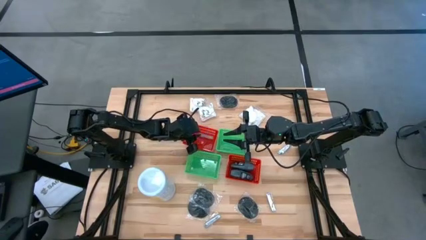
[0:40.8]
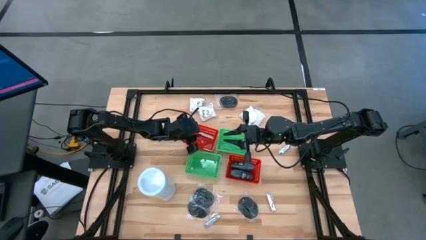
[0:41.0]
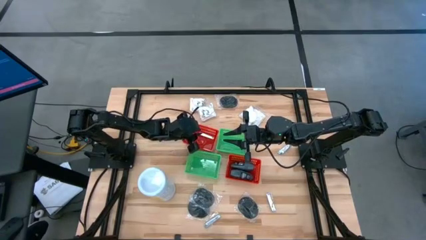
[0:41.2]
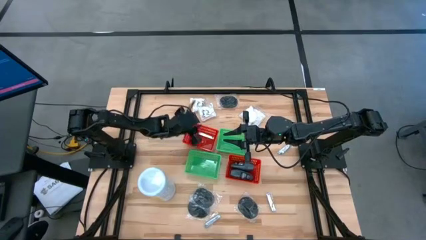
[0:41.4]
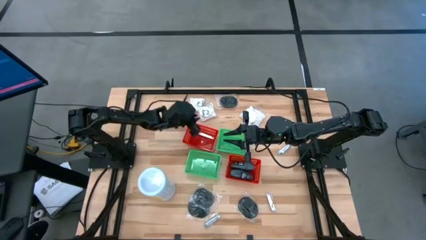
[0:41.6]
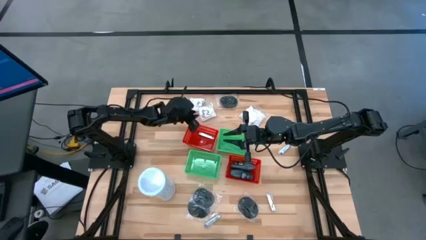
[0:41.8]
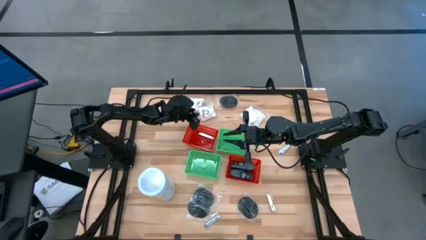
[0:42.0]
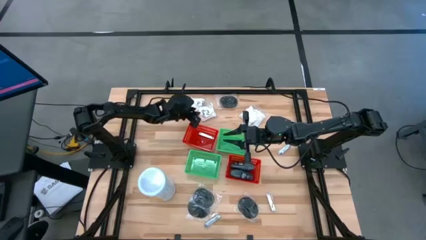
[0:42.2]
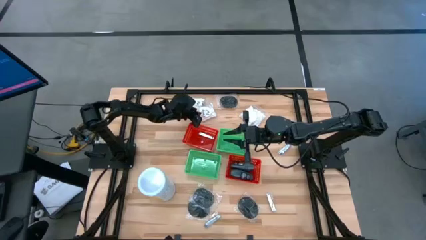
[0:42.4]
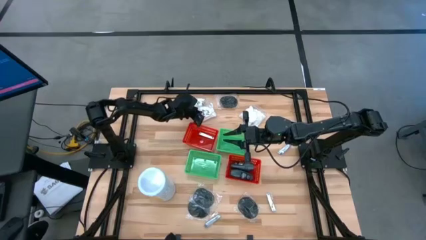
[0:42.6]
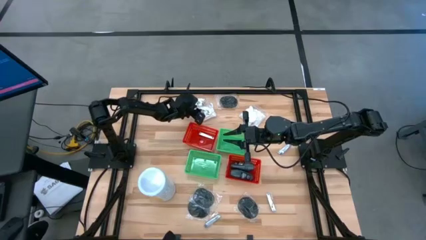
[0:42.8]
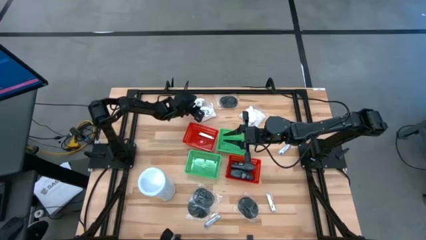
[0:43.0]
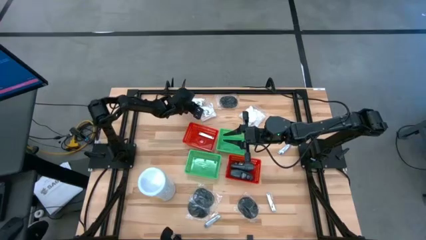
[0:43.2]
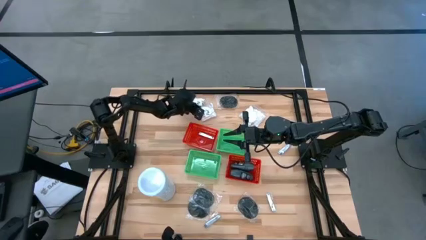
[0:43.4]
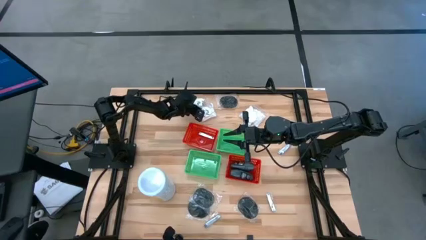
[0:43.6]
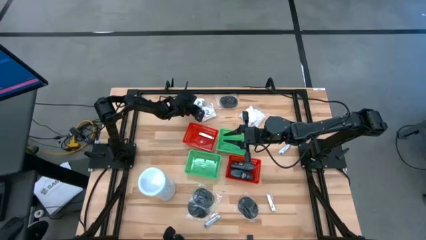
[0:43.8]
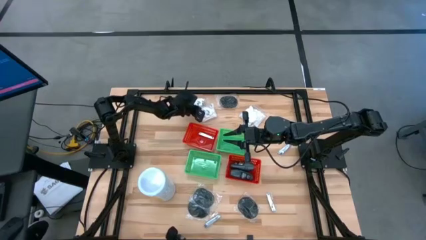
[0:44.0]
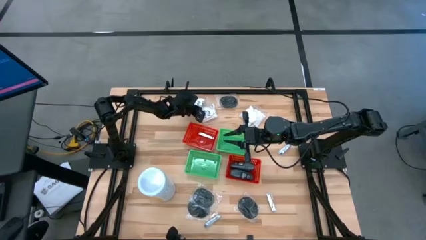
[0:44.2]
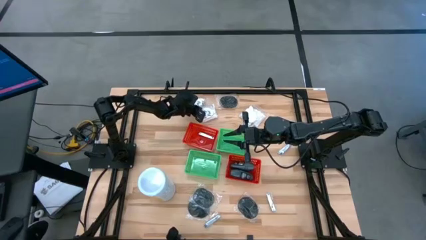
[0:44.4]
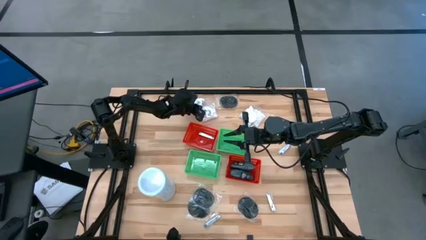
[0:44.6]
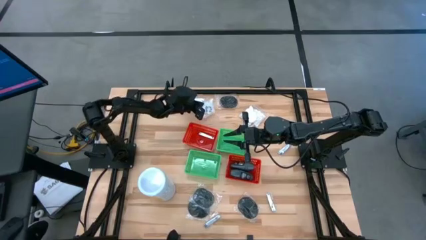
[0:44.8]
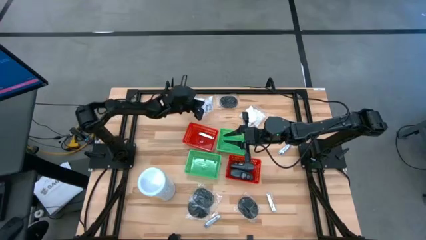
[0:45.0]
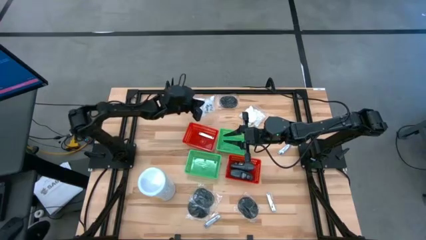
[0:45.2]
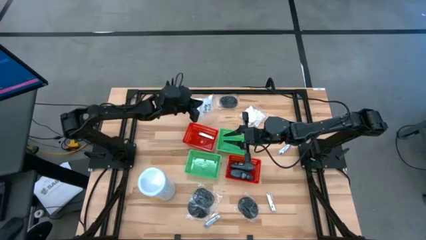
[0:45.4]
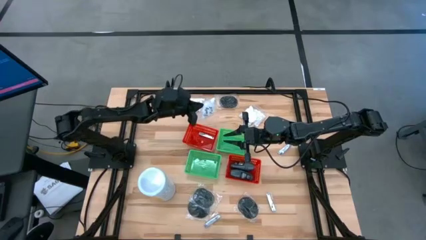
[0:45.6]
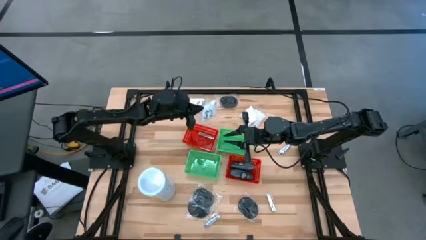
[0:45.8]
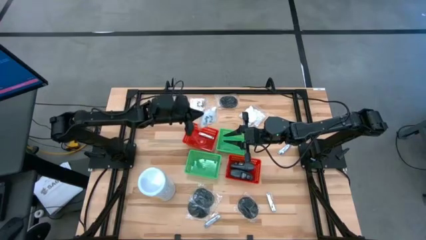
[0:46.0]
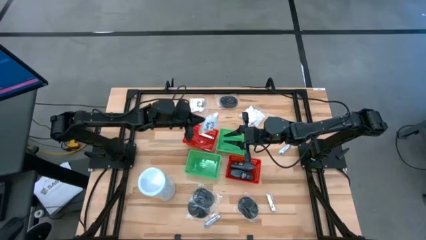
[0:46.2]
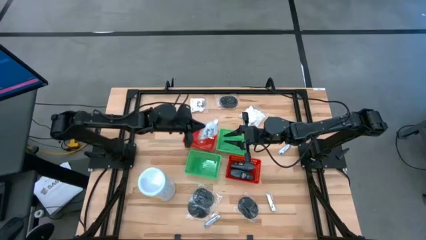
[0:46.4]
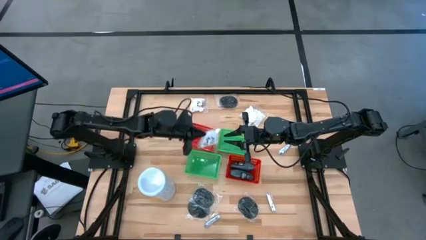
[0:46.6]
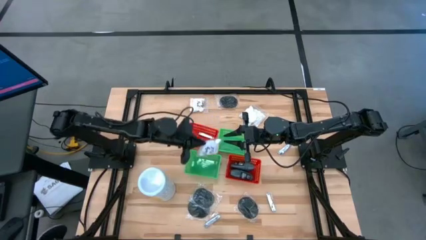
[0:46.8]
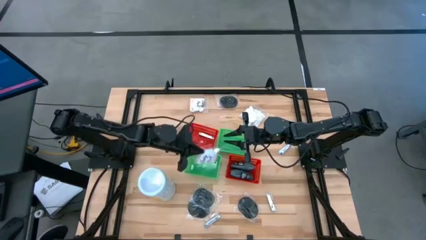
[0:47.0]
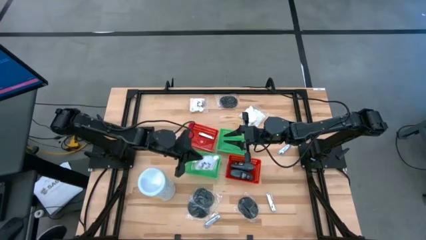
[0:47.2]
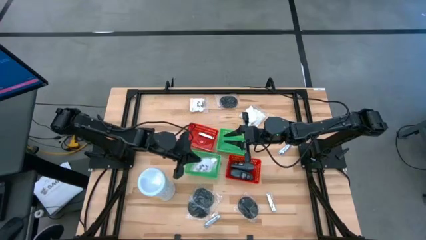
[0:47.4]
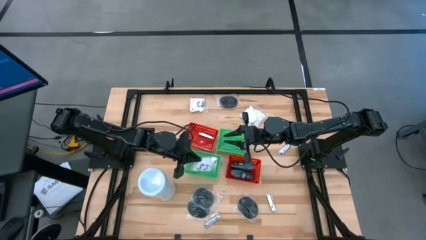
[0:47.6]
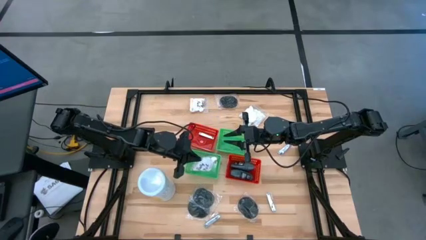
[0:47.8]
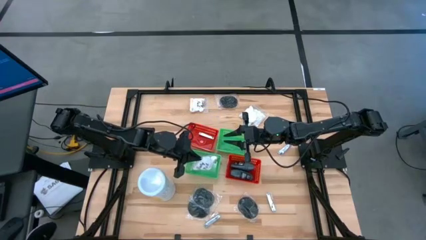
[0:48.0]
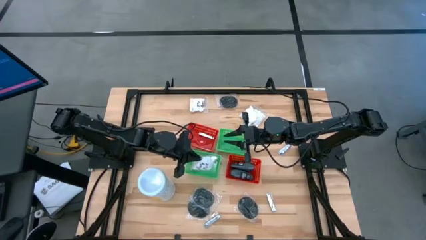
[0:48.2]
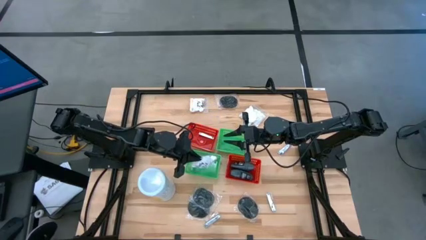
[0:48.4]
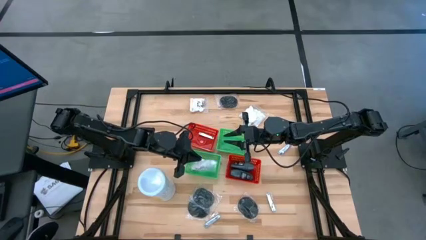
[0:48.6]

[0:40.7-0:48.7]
Task: Pick & Place Travel size toiletries
Put the white cotton pack into the bottom left green bin

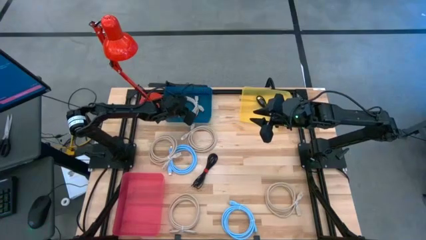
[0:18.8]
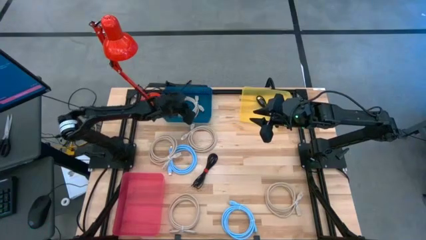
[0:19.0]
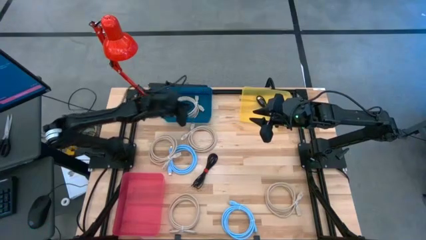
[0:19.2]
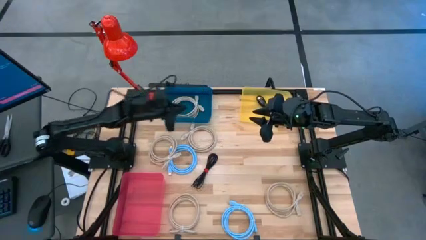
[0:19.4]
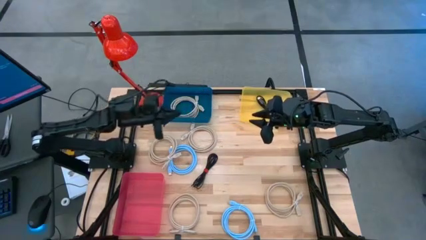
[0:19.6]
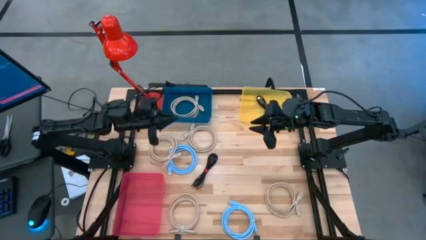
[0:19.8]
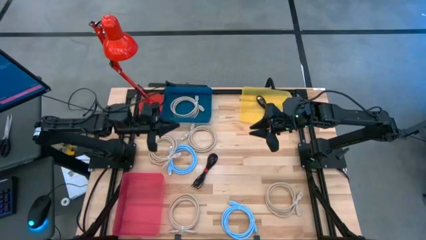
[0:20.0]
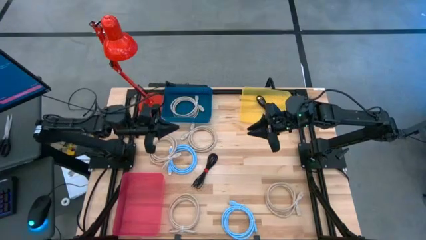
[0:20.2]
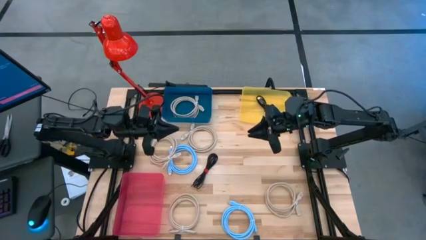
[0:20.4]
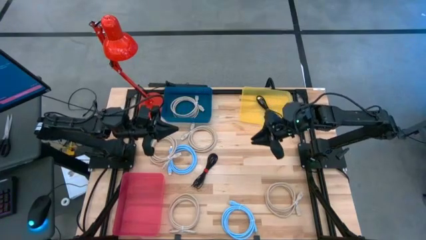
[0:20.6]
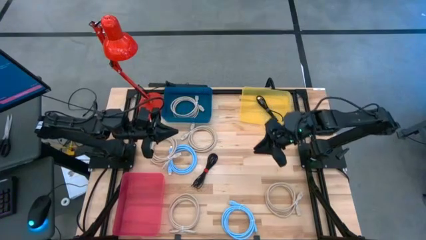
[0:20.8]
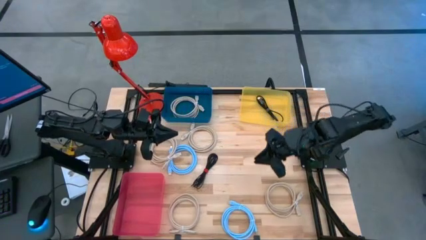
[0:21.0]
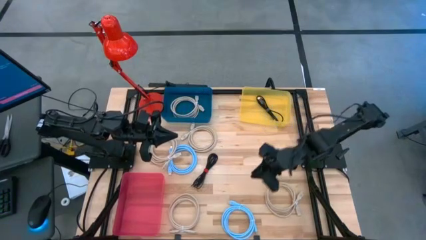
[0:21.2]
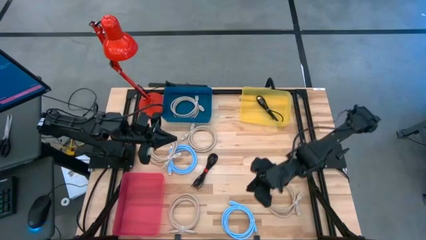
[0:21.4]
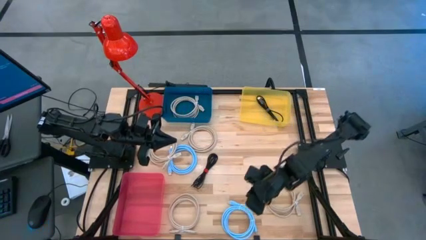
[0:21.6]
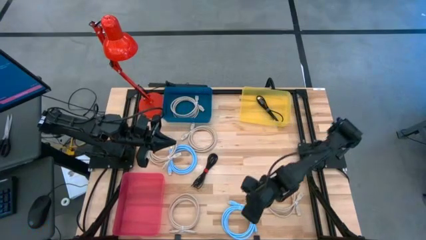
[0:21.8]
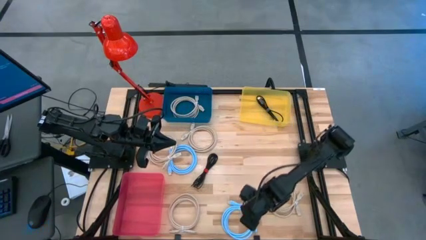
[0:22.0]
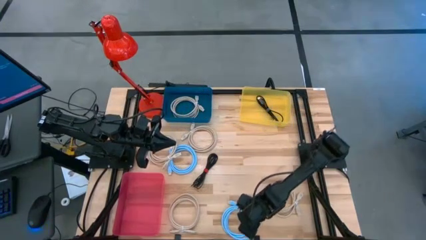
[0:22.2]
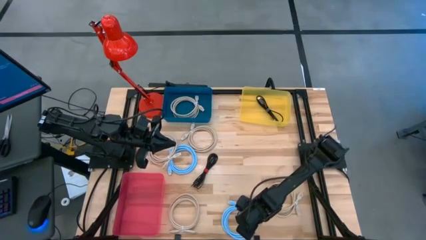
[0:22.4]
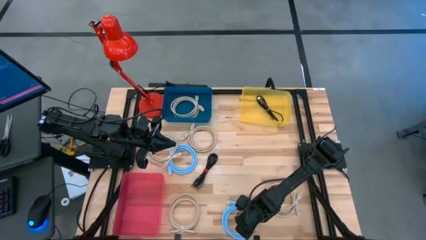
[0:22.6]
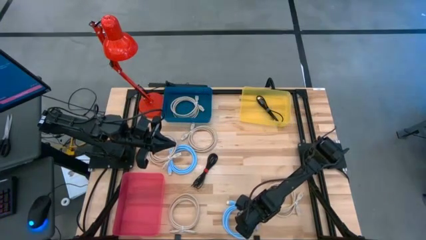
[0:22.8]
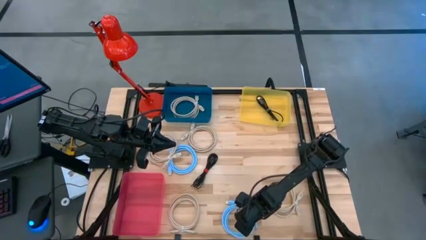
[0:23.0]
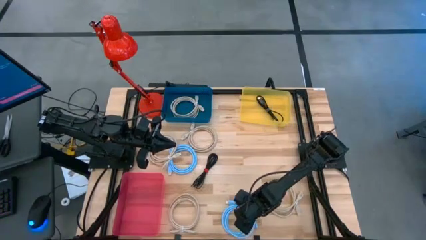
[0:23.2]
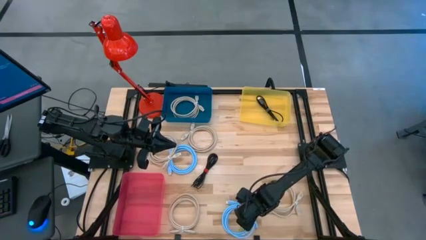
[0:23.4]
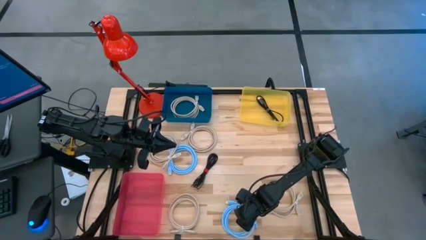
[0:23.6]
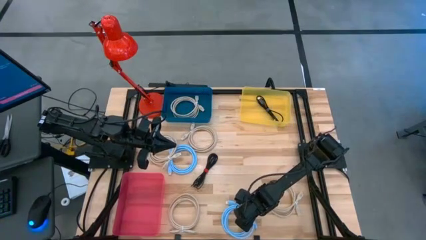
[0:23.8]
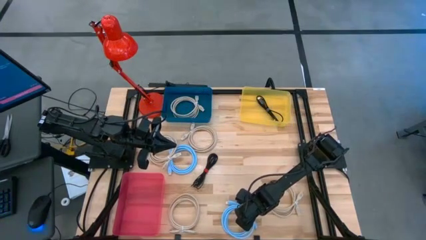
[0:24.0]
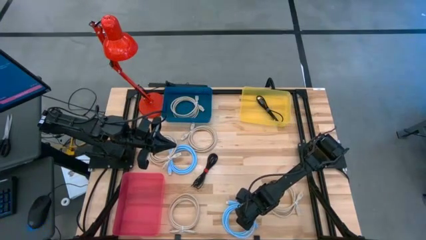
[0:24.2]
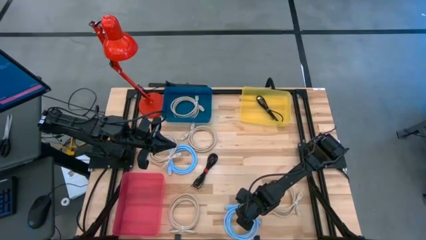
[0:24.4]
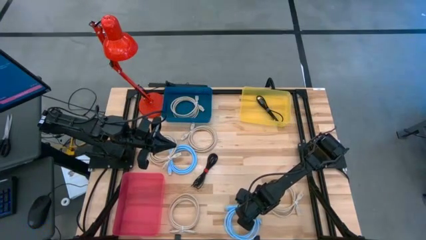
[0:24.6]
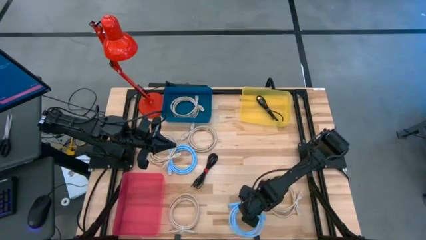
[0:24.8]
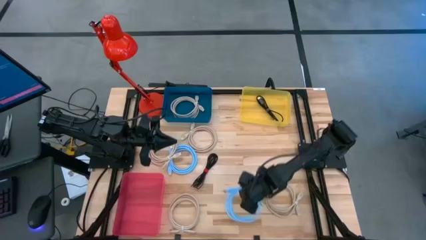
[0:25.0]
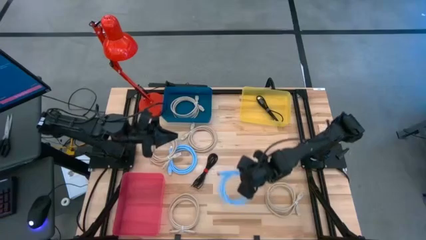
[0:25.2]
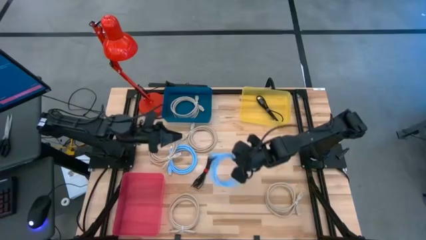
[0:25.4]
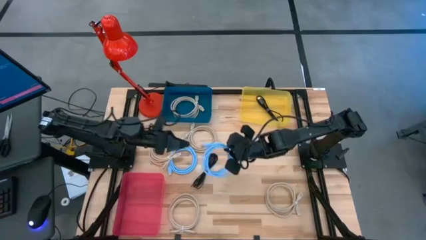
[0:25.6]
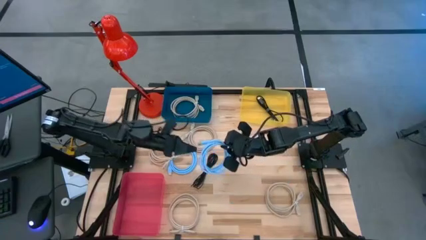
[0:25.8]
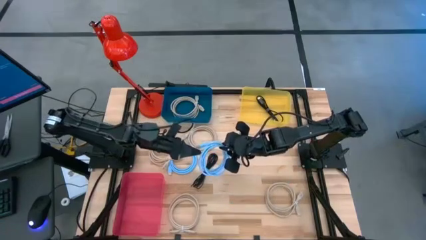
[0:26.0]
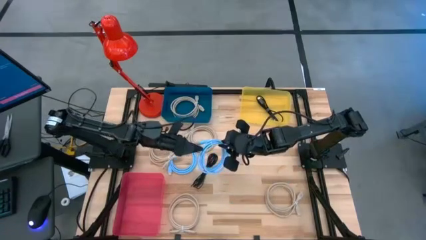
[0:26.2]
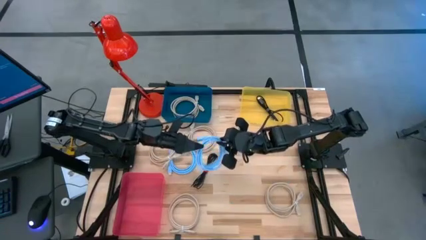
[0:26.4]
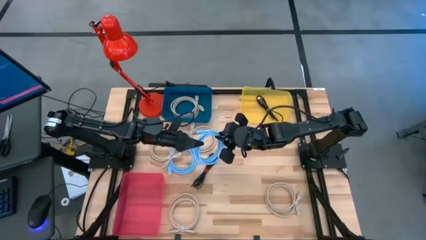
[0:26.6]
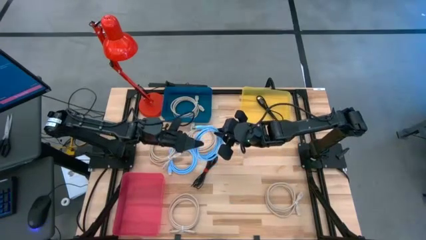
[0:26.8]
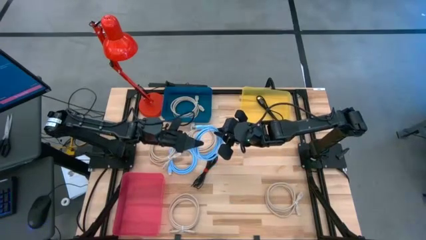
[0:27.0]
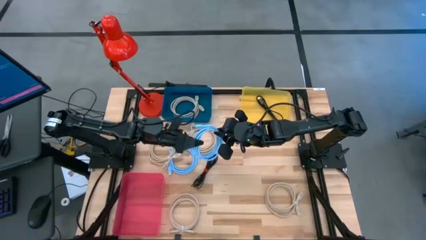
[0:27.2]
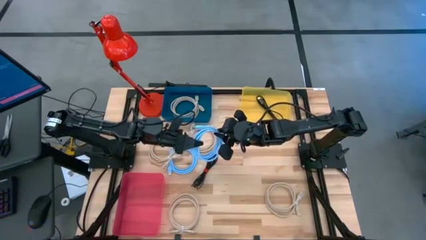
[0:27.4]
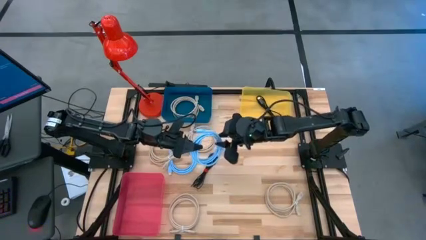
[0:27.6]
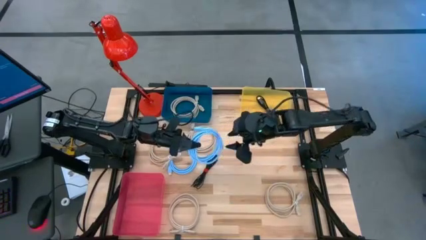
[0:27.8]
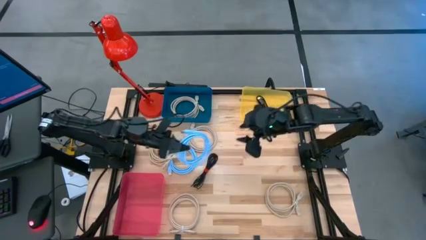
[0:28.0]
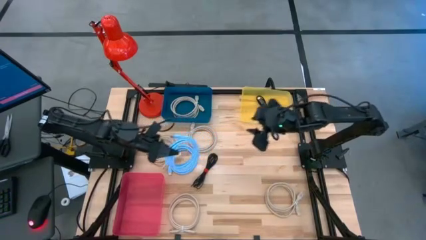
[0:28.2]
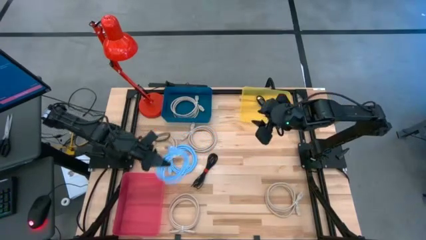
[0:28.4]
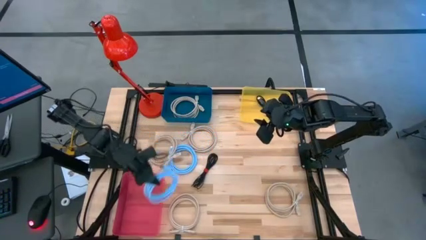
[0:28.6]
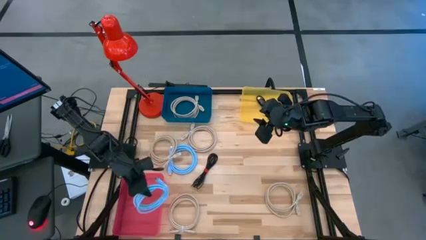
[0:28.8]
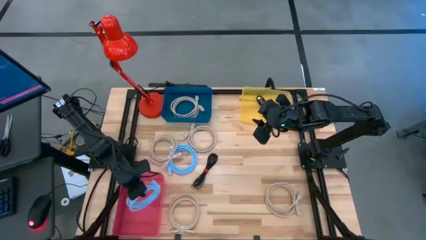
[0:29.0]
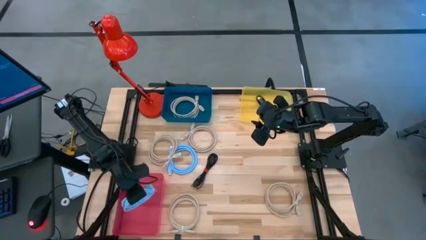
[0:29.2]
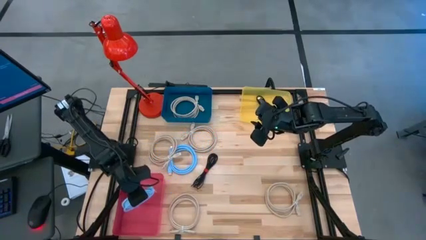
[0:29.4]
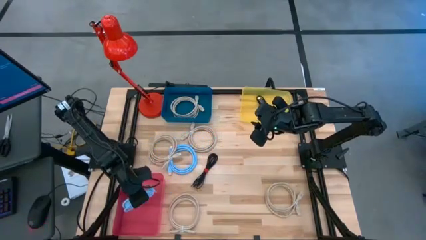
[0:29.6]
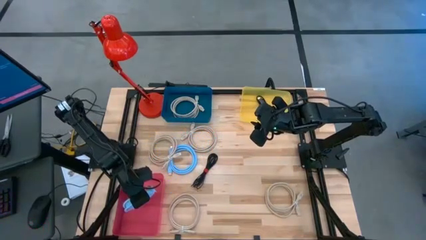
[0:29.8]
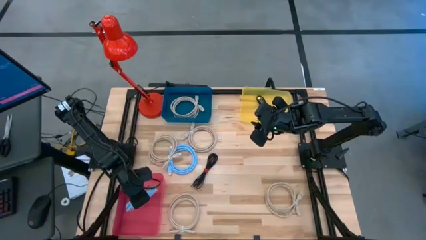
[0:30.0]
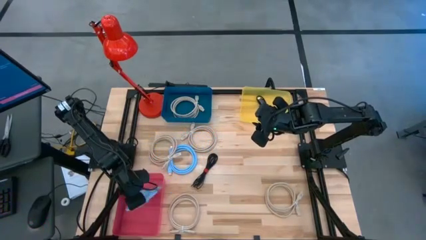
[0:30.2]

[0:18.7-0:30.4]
Task: Pick & Place USB Port
Put the blue display cable into the red bin
